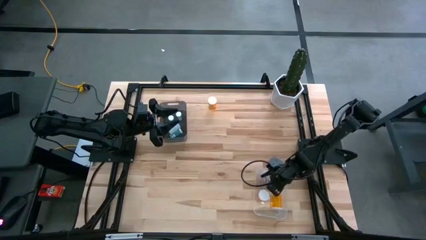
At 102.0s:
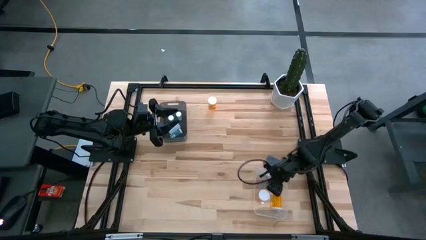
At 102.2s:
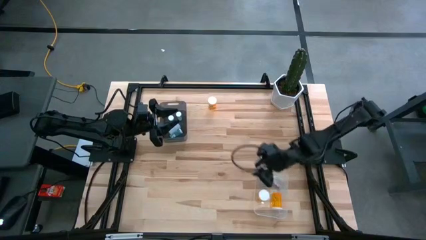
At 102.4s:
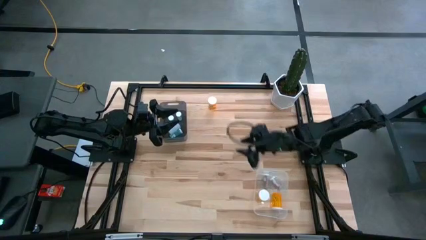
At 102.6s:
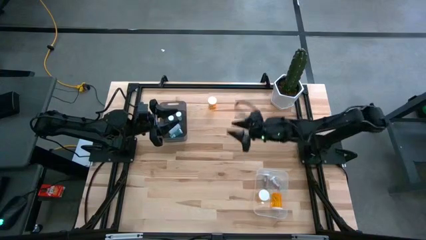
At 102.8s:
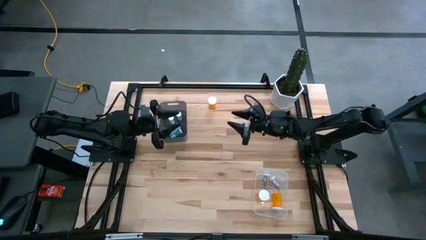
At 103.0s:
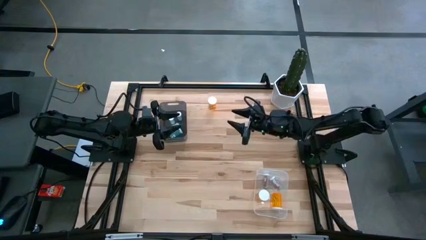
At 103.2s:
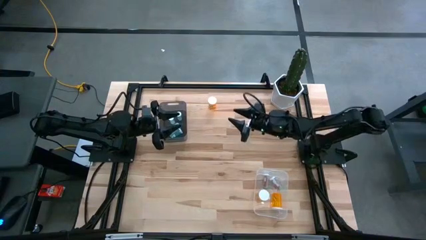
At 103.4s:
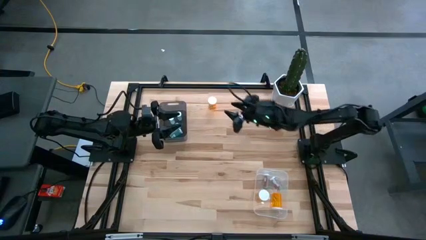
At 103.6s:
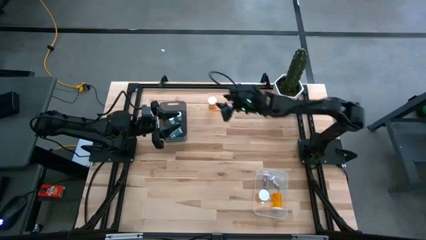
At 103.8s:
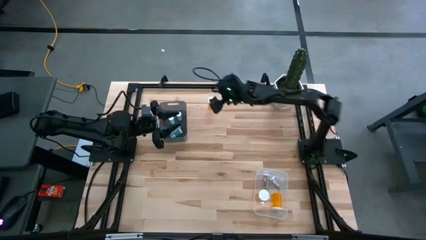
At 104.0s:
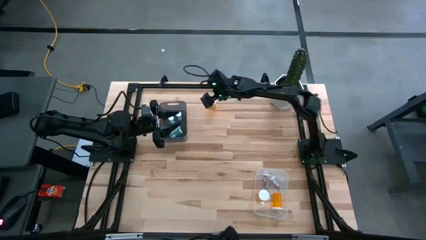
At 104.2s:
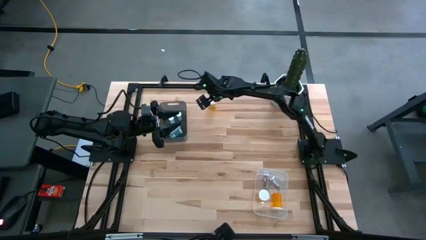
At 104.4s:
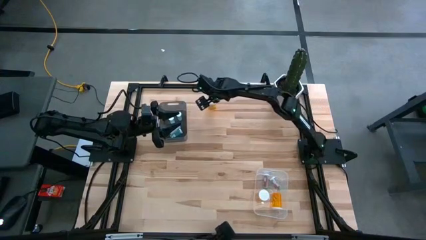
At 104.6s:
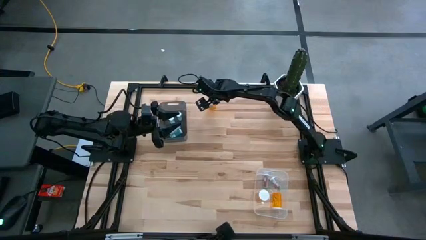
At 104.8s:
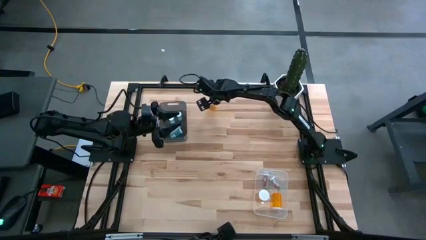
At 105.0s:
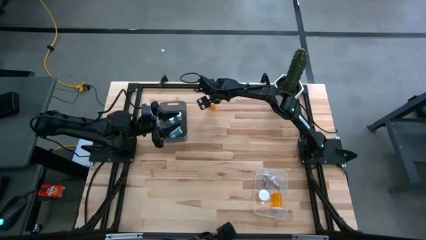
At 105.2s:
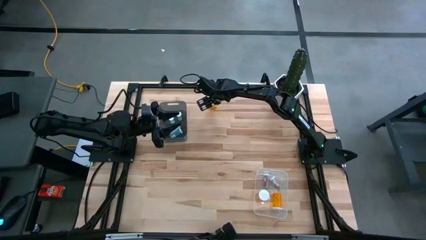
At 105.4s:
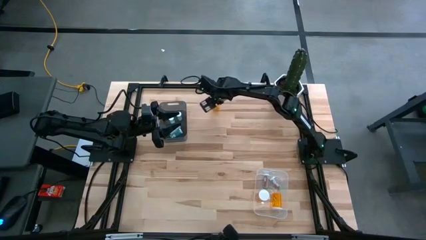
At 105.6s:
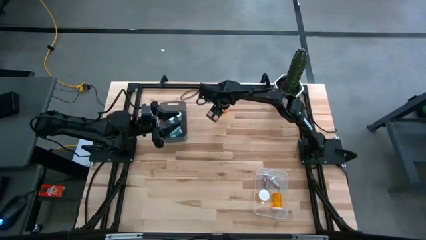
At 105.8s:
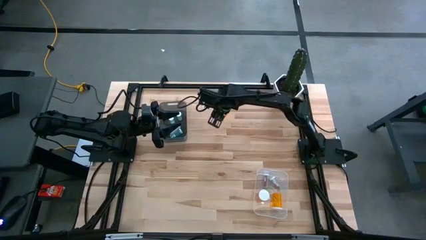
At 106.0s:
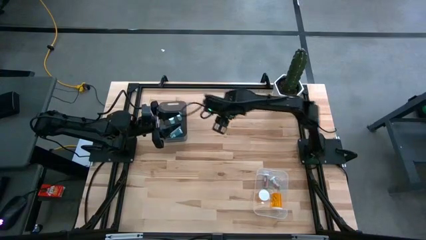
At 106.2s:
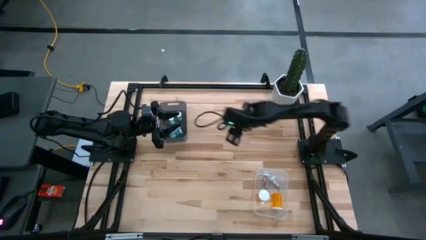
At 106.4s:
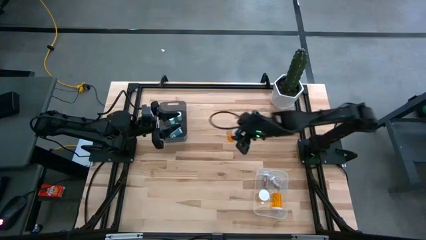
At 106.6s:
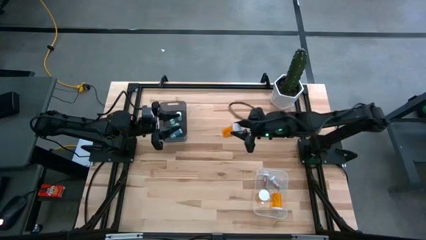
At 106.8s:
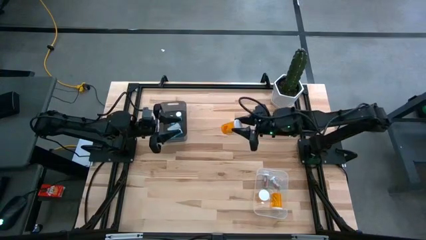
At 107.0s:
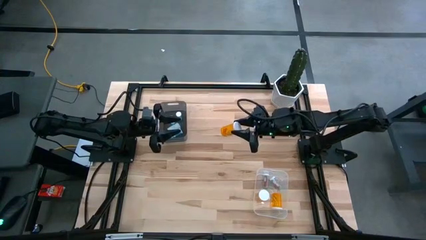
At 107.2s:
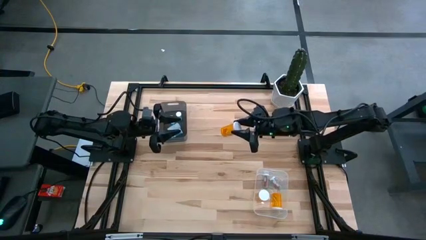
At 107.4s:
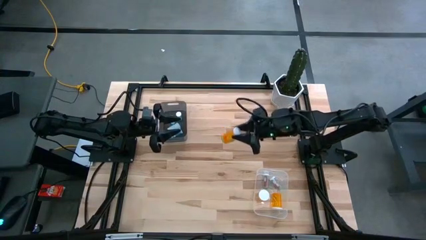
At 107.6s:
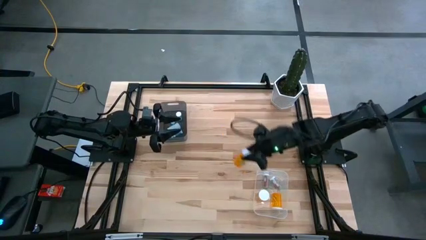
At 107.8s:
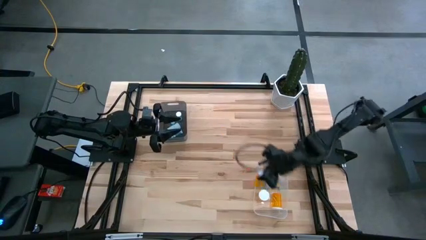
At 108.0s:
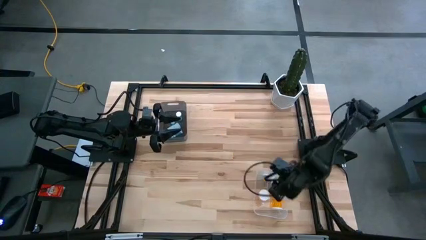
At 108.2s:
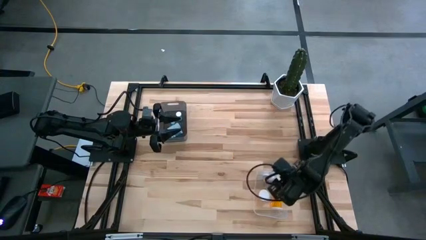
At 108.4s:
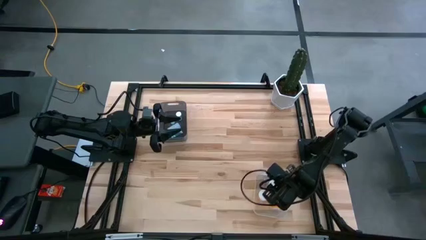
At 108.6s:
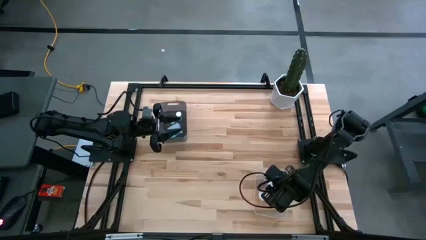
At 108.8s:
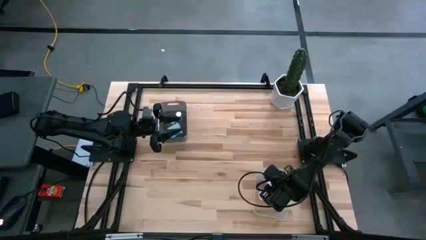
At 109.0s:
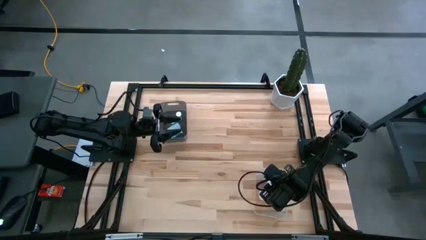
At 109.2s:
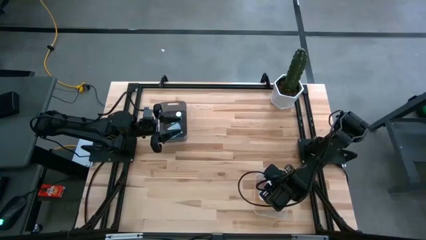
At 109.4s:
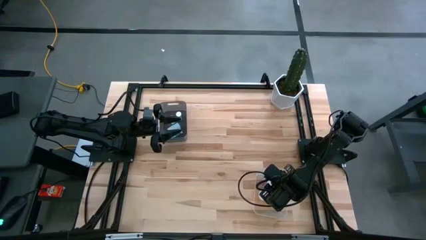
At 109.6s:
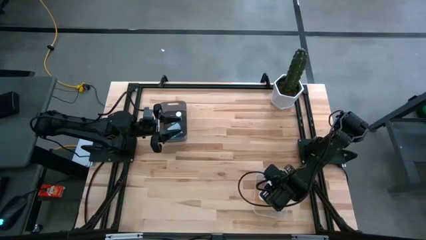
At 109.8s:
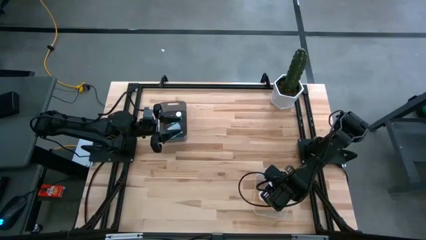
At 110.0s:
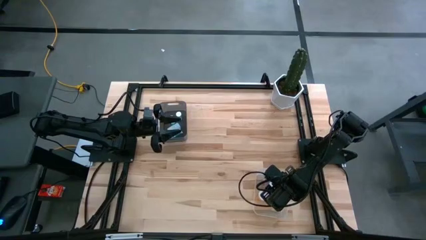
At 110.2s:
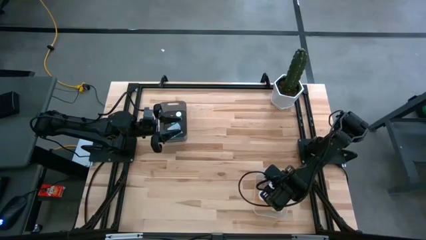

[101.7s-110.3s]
Task: Pick and place medicine bottles into bin by pill shape (circle, oval)
Put the large orange medicine bottle into the transparent bin

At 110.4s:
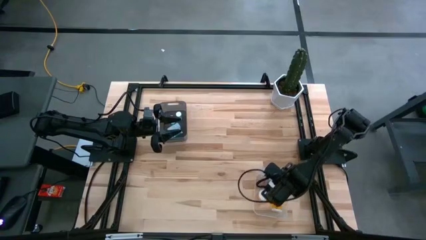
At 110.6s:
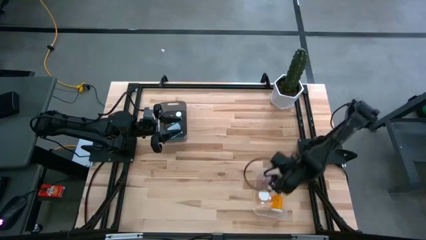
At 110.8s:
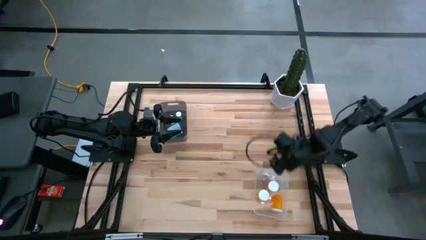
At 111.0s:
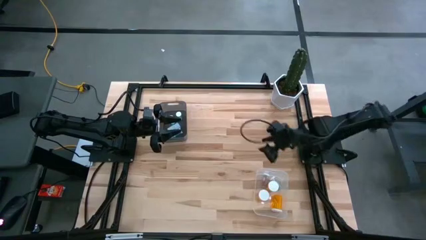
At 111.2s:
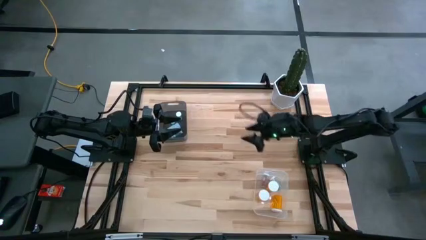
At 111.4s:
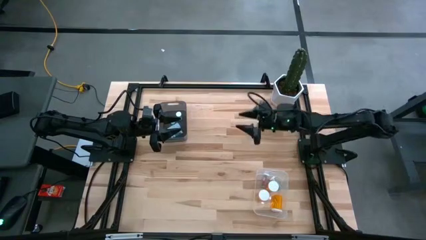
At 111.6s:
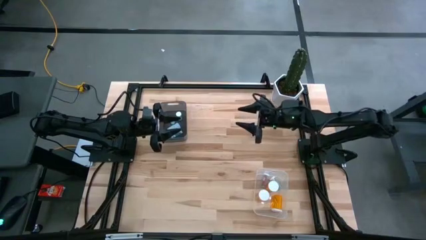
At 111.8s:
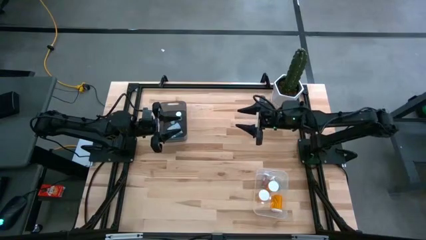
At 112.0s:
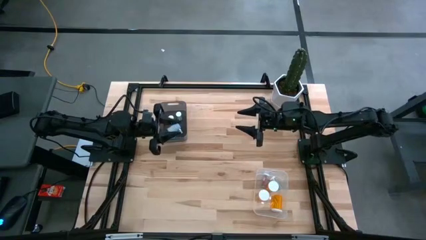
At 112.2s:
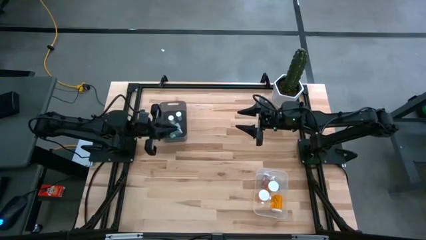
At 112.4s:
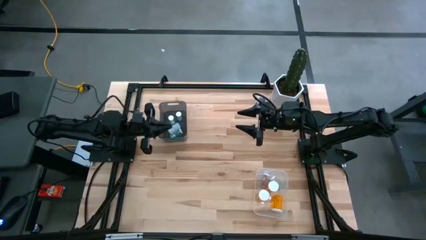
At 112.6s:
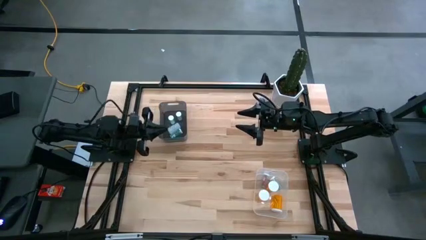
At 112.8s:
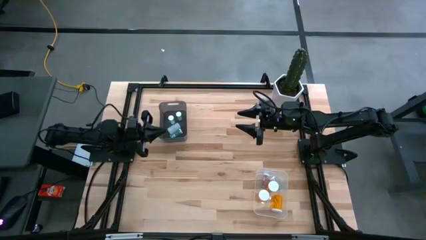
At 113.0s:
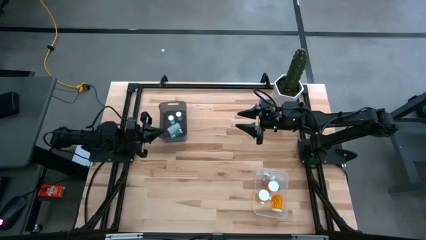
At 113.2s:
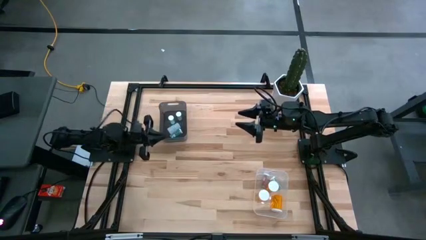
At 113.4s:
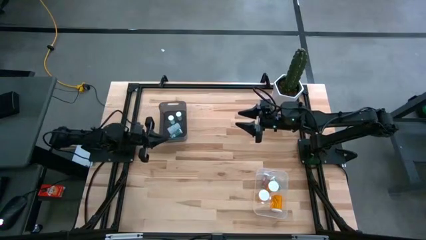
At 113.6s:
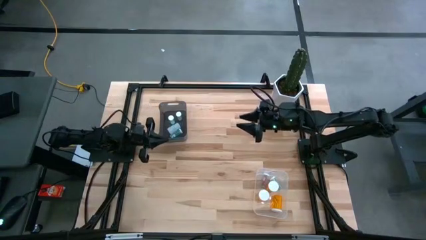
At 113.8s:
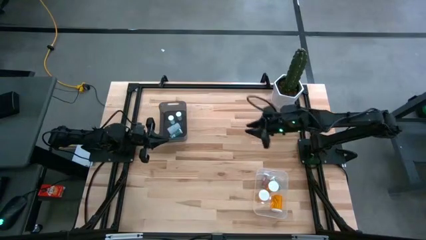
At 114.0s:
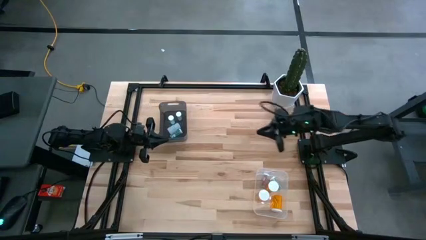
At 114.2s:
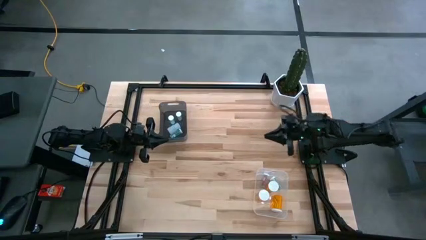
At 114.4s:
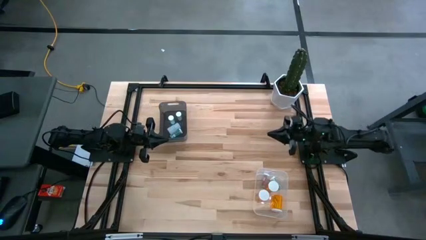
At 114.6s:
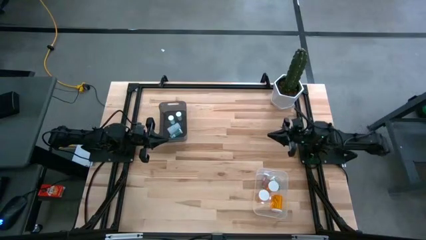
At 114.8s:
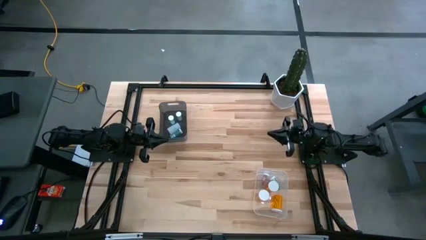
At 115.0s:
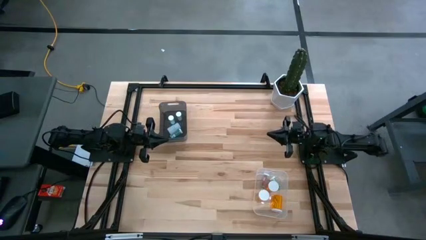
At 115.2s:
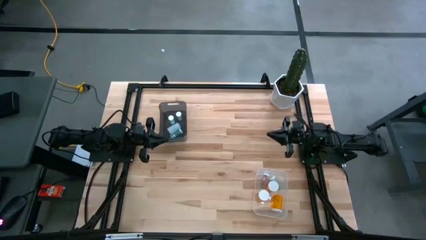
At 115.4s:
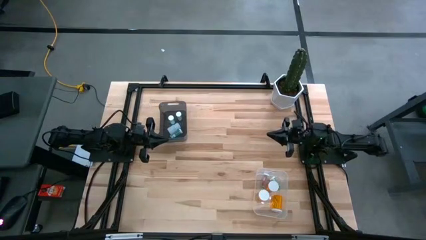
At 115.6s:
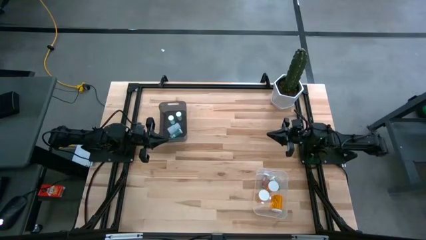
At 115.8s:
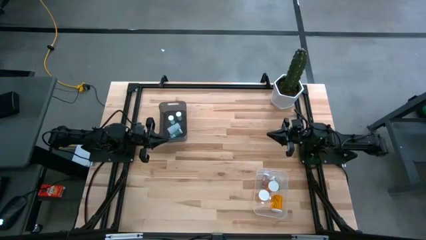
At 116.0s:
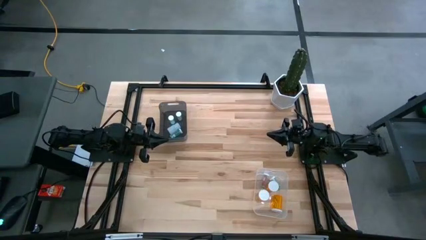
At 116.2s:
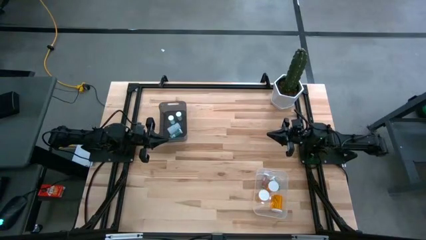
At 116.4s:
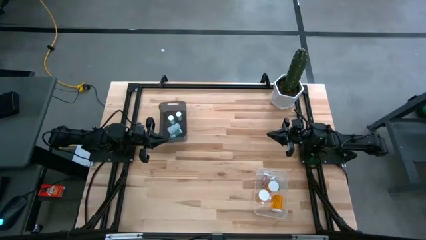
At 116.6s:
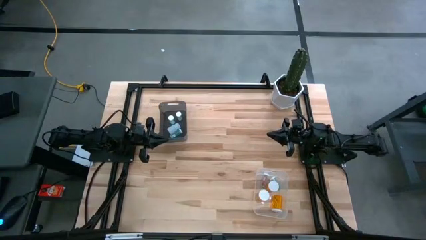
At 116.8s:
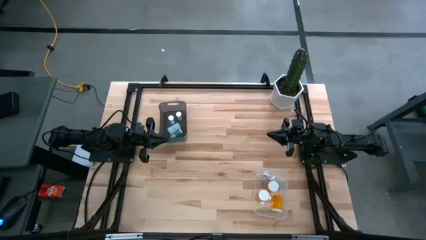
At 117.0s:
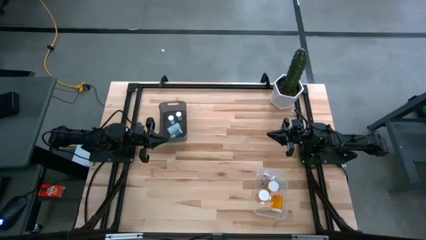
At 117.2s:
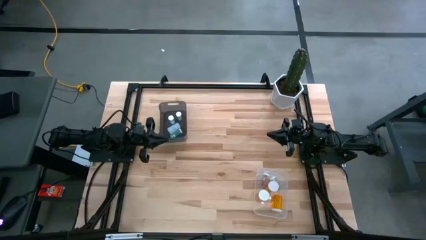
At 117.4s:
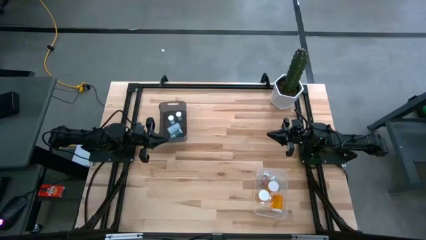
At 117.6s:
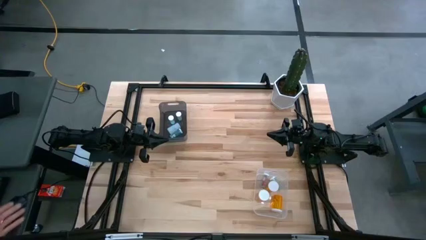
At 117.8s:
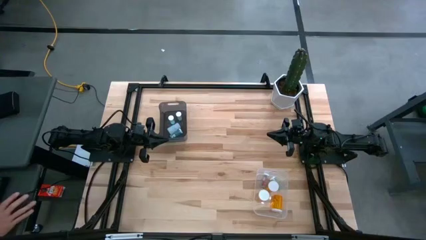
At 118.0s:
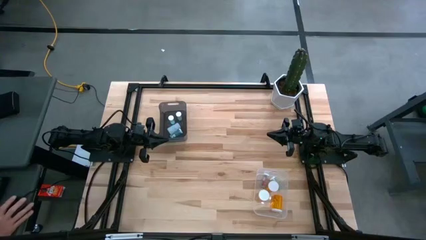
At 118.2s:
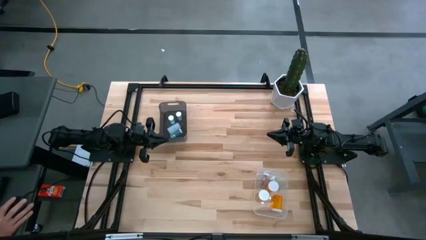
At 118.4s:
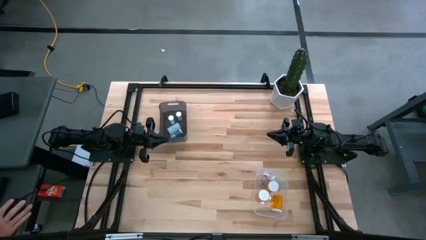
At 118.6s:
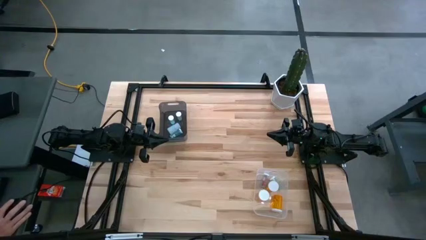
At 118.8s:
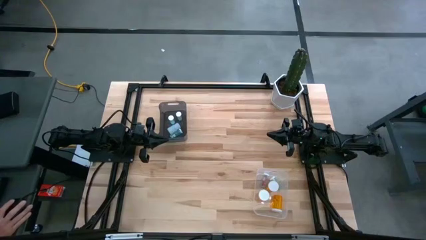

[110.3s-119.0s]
Return to Home Position
